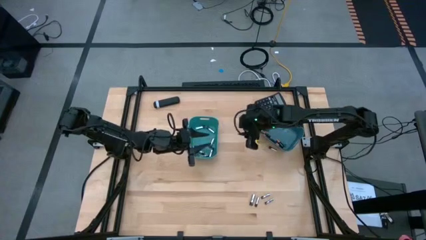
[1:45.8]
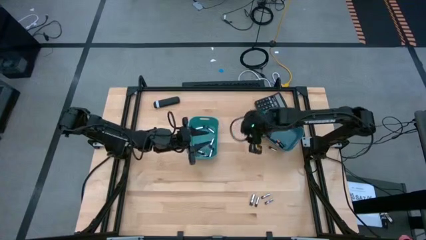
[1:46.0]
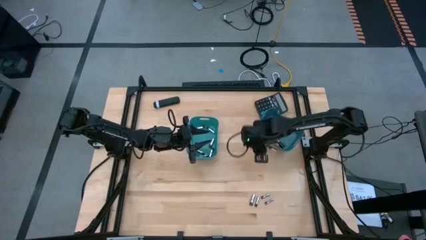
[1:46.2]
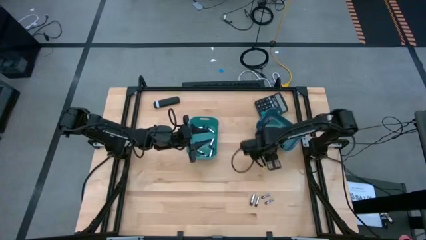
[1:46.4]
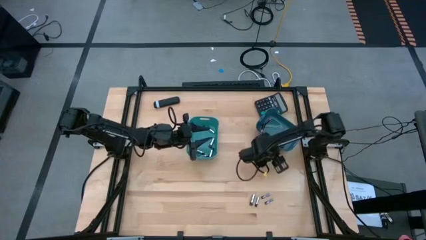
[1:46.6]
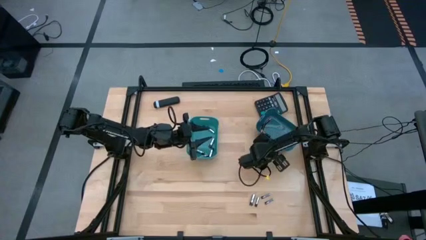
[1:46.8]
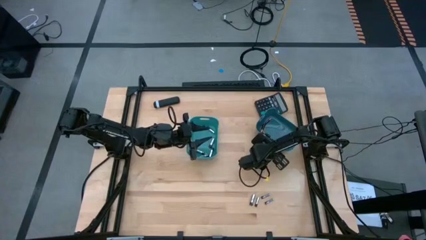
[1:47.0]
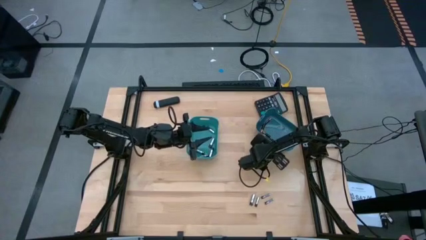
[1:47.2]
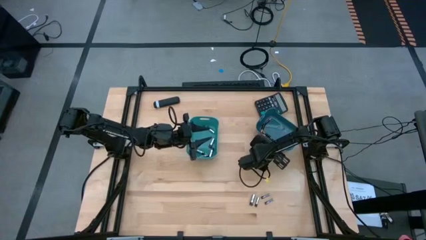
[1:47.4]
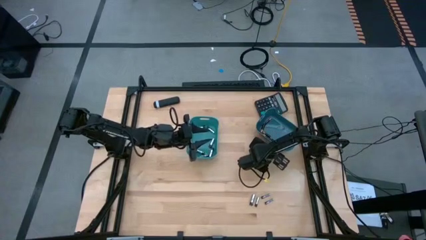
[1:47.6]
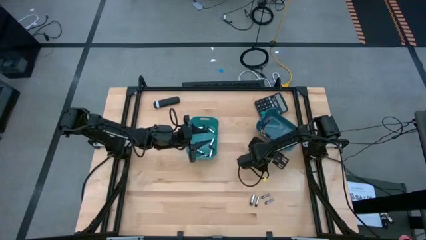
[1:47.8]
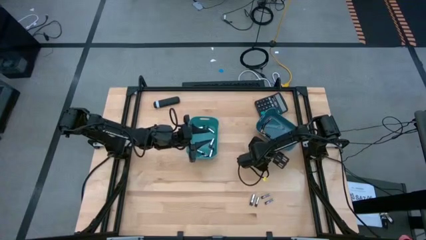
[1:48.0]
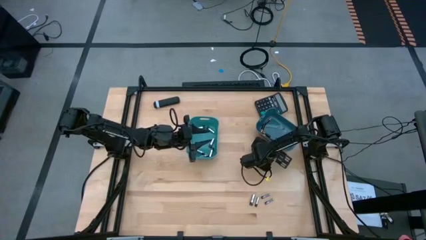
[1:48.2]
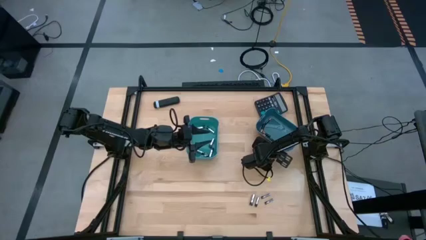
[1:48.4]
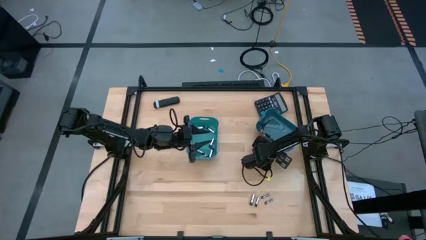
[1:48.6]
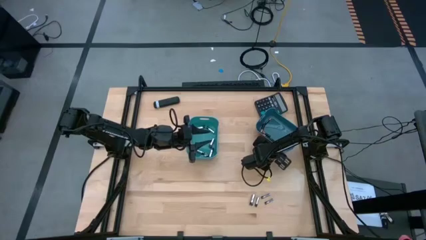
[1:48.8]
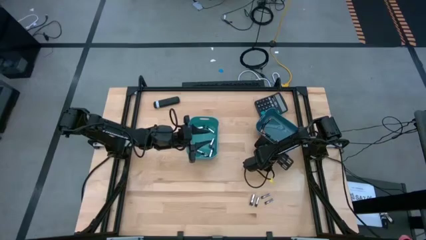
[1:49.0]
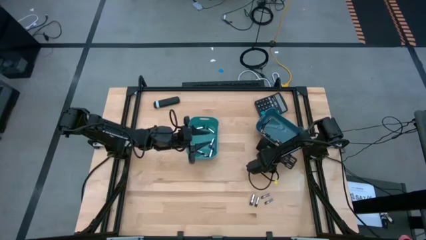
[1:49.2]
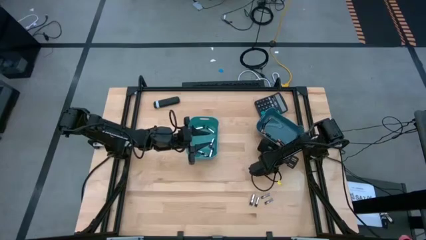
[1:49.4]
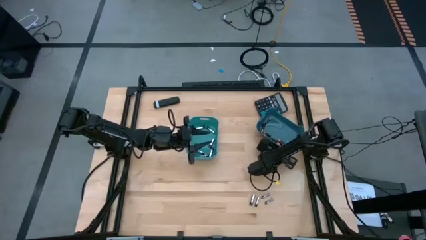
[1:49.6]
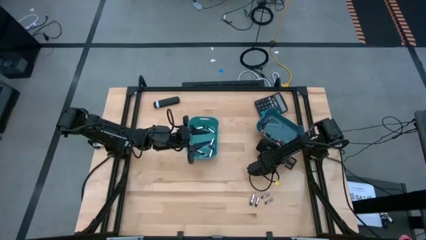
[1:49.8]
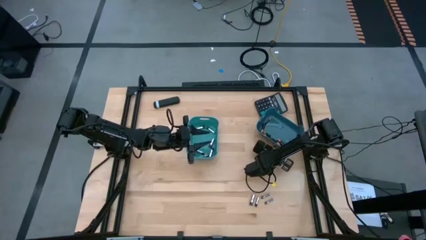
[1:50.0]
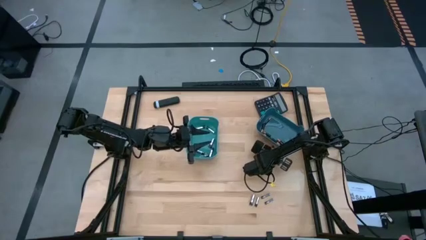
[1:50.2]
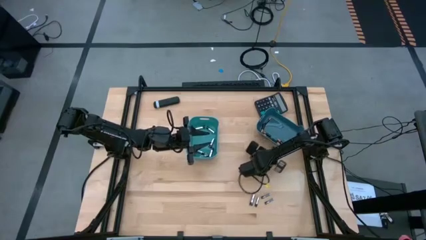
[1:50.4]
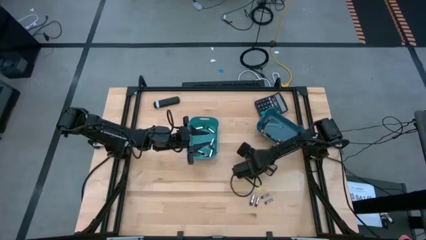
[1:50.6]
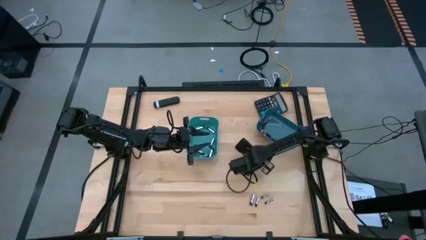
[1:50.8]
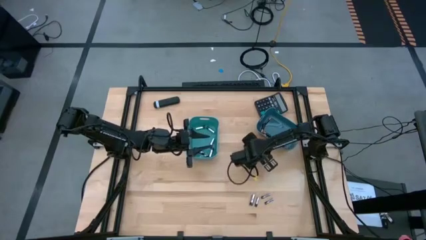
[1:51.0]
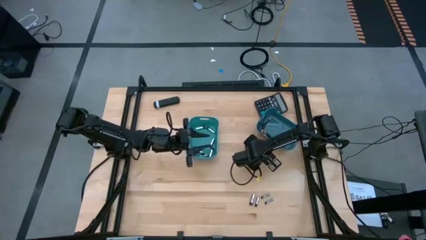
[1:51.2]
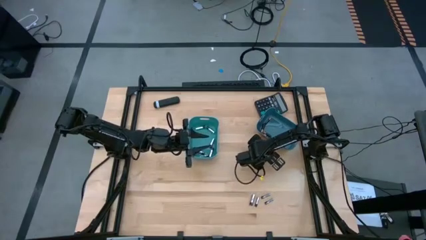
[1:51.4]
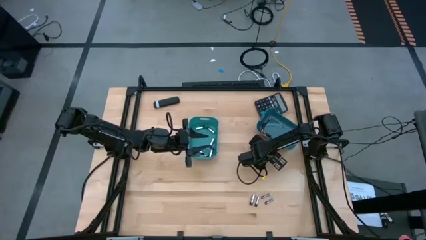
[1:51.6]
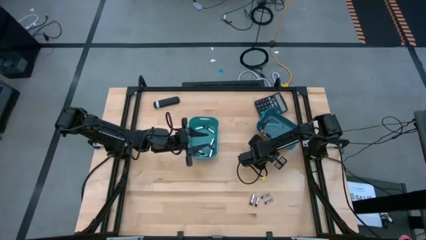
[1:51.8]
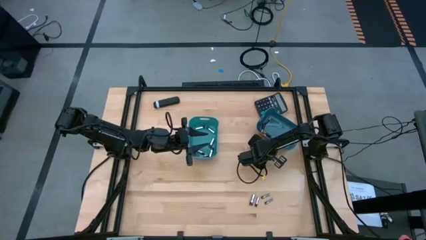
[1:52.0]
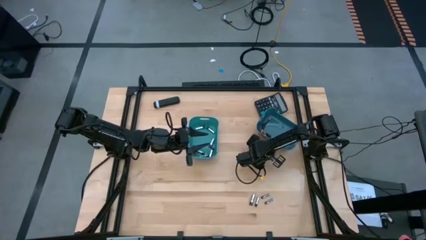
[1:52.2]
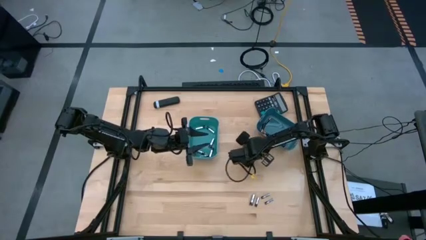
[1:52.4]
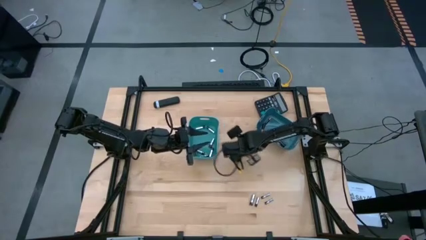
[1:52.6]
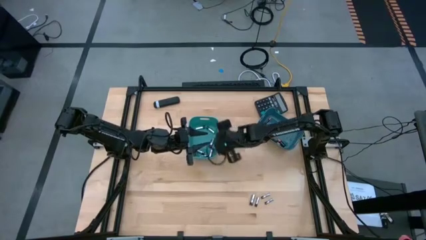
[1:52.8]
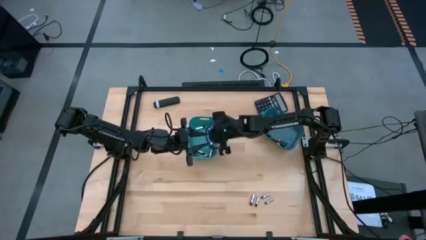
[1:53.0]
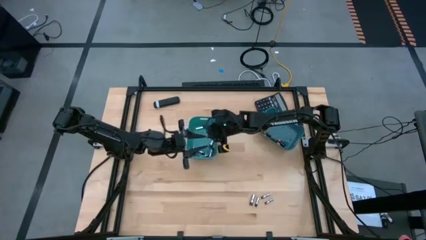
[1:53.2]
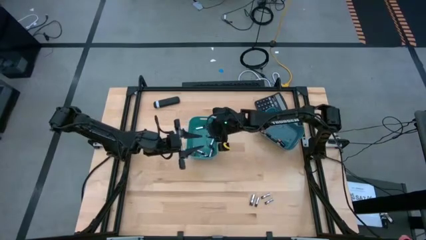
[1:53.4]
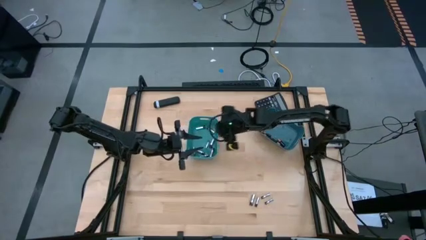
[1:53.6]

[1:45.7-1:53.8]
Task: Sort batteries
Put the silver battery into the green bin

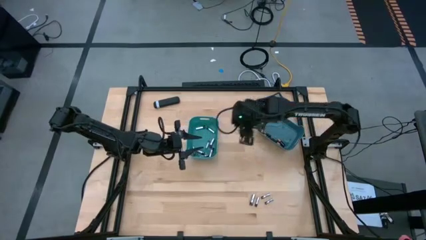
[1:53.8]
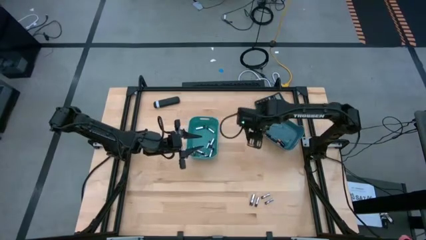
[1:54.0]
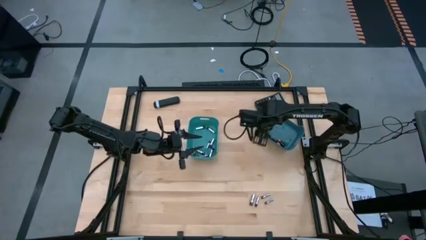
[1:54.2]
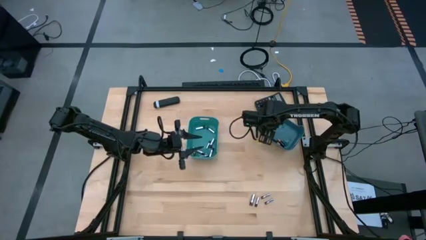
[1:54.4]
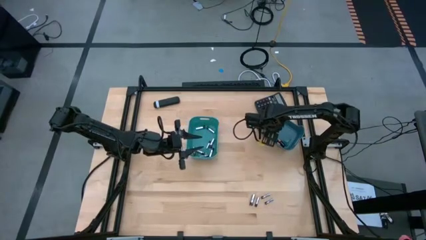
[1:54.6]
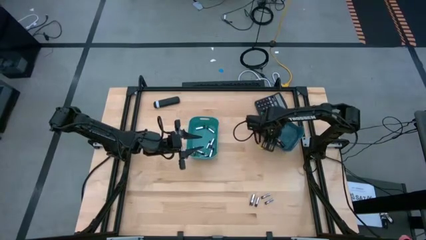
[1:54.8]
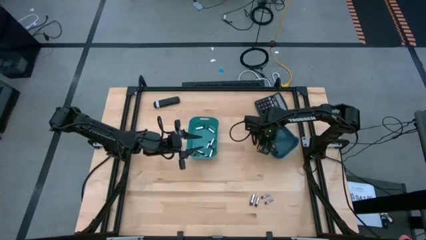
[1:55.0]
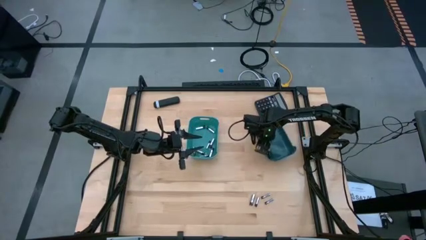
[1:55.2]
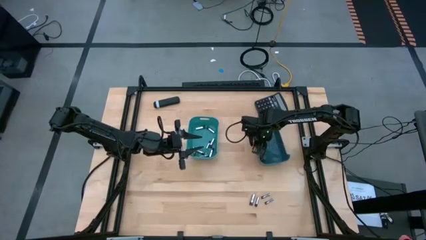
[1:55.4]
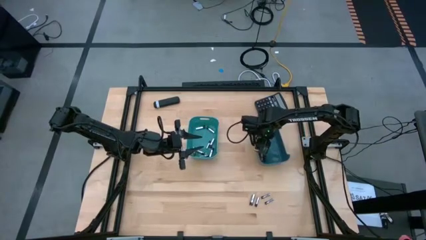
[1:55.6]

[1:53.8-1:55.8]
Adjust the dark blue bin

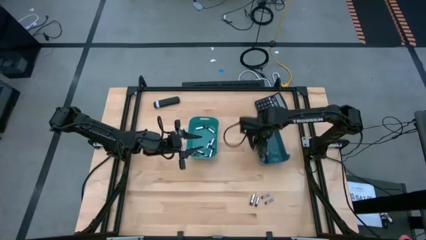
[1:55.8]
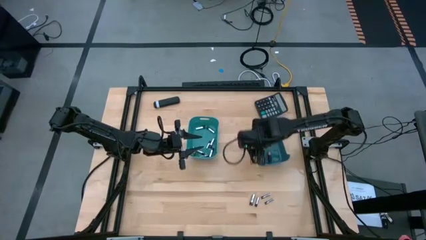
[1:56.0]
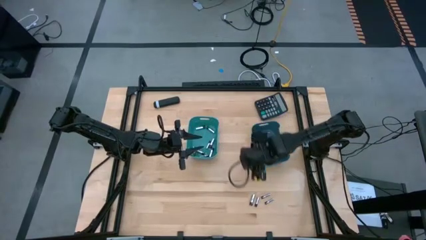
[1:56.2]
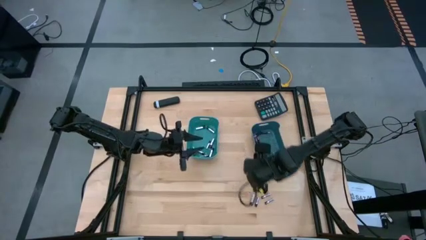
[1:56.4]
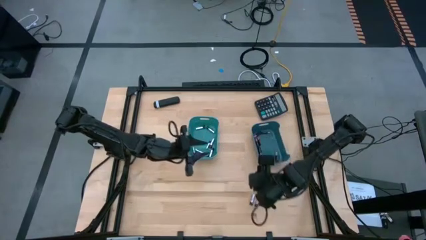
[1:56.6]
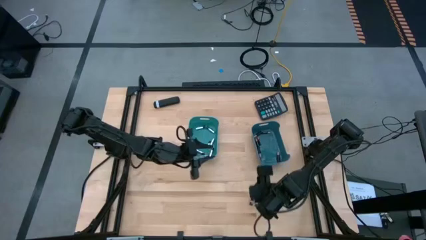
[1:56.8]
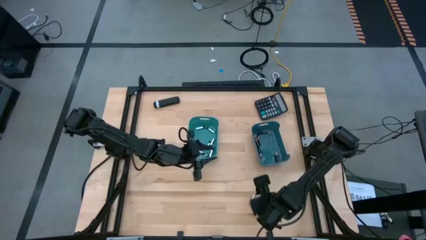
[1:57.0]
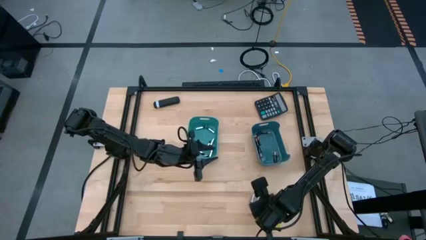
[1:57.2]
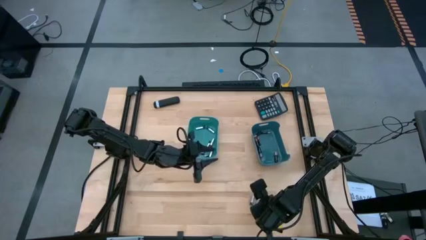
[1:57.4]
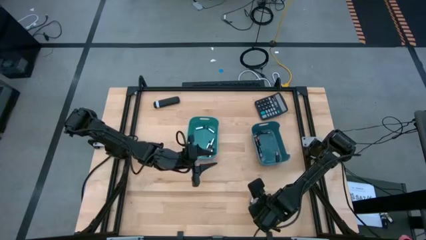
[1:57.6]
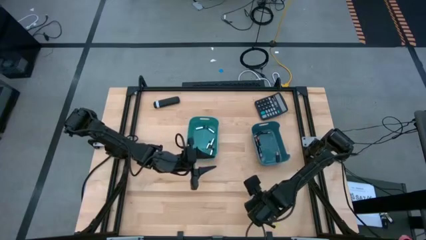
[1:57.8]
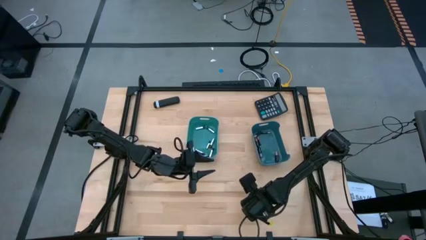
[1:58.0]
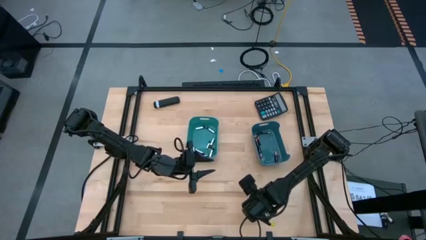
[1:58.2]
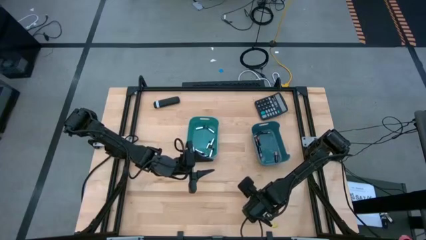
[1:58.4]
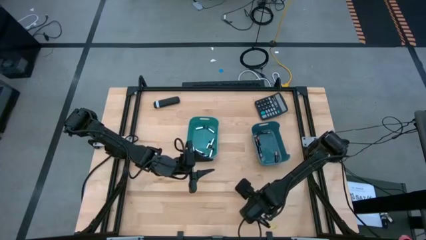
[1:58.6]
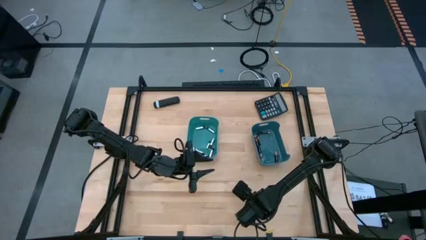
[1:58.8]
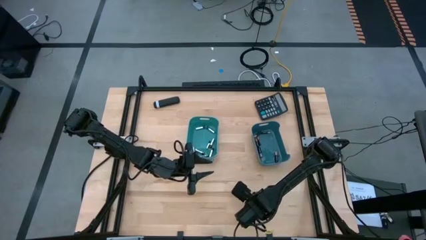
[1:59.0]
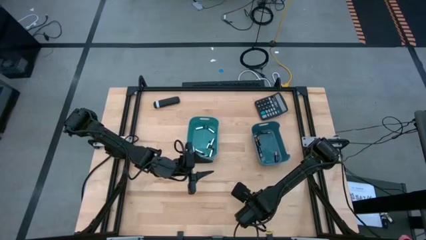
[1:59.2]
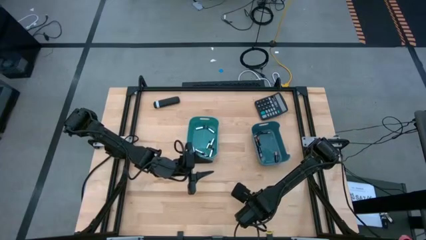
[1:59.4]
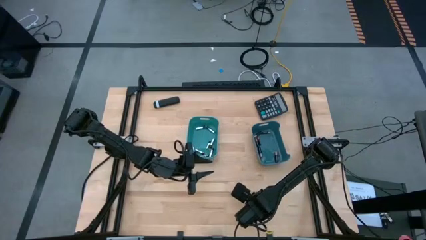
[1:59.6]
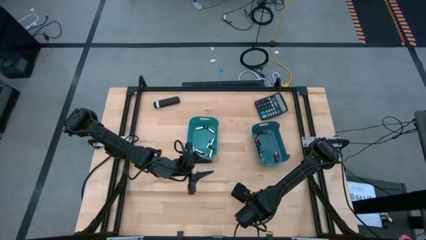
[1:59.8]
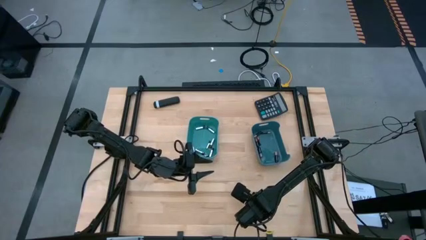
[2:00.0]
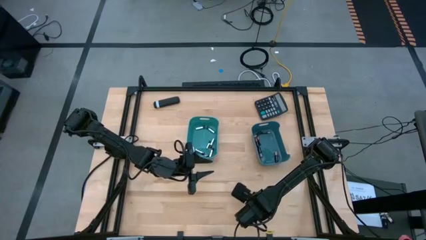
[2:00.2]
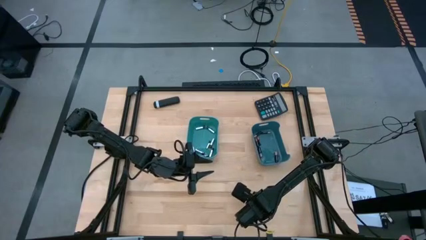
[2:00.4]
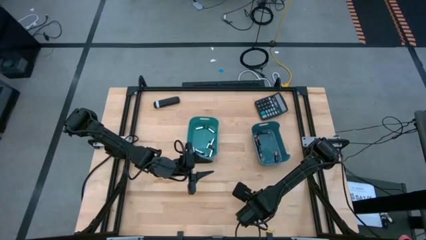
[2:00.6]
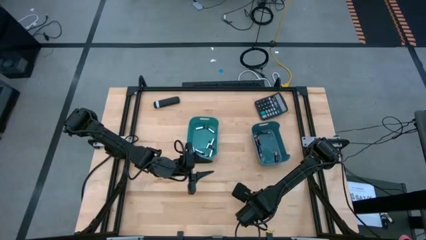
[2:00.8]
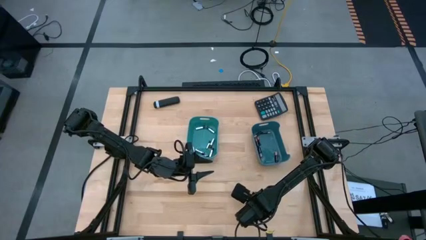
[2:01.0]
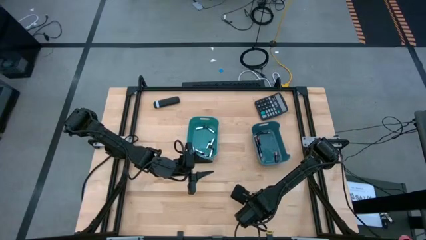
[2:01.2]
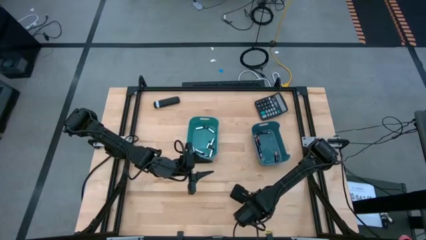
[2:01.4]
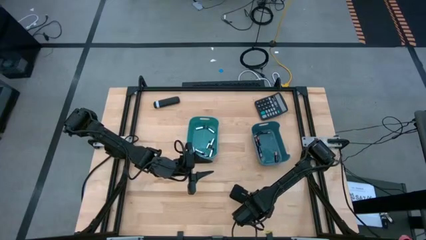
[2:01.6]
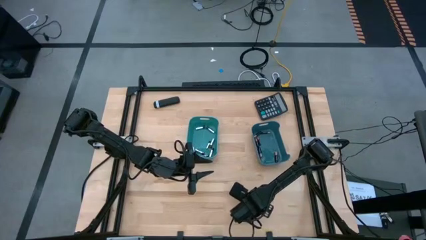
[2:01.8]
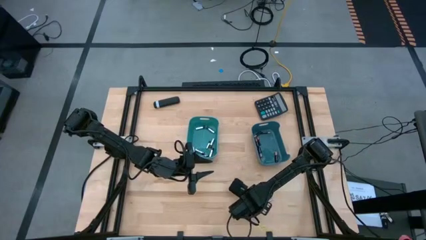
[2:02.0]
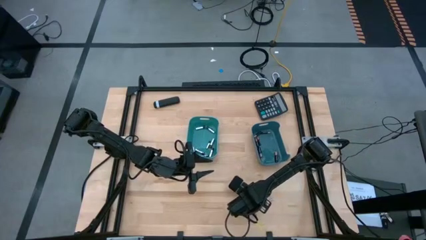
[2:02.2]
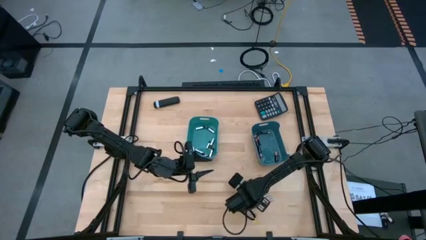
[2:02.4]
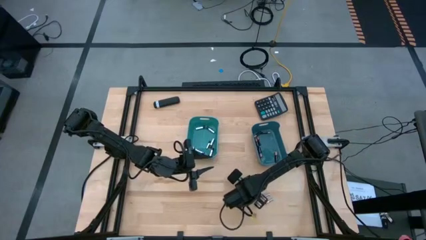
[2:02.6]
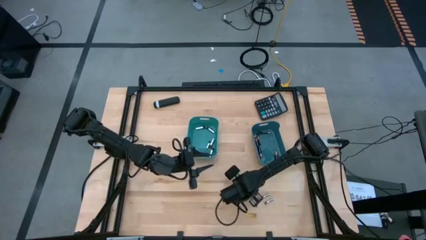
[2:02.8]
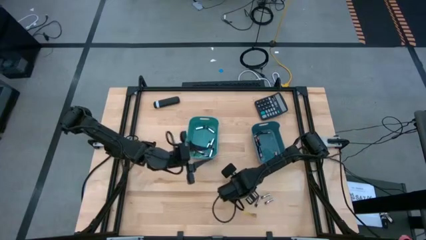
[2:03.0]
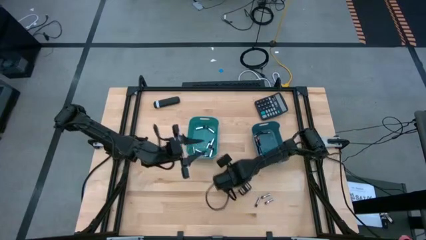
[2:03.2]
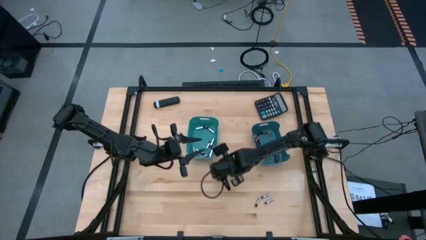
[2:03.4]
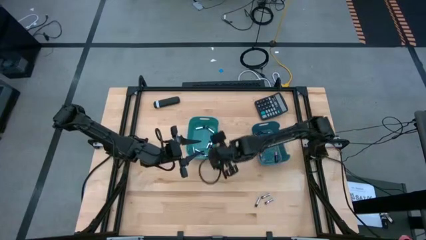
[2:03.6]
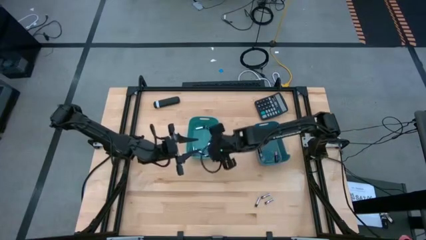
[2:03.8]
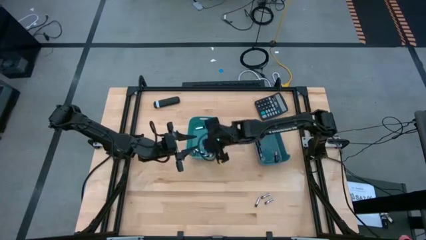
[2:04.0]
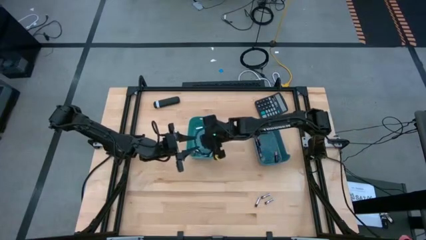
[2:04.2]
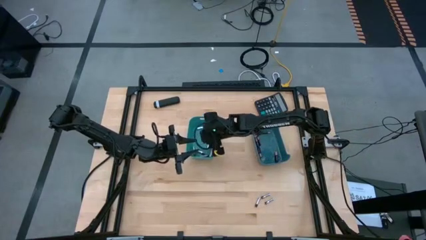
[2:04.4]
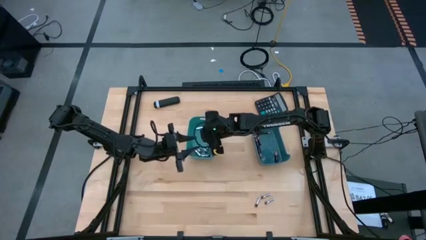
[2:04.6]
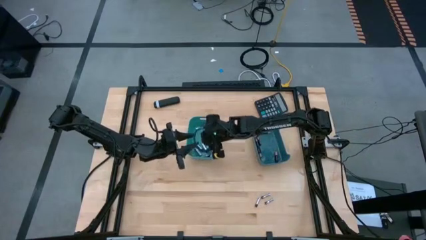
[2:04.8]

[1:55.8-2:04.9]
Put the black white battery into the left bin
